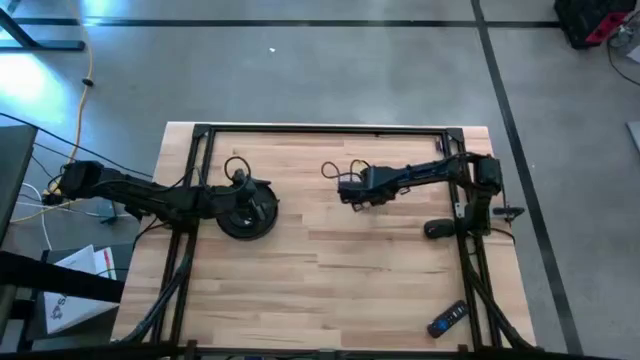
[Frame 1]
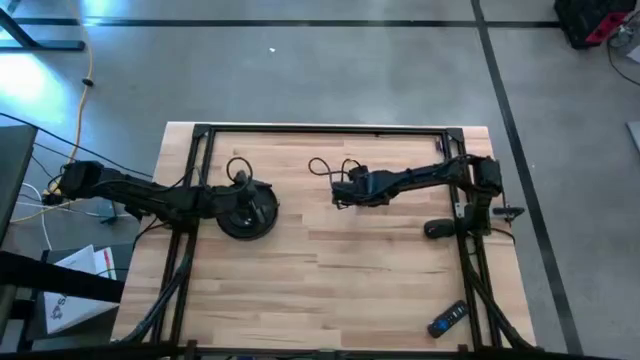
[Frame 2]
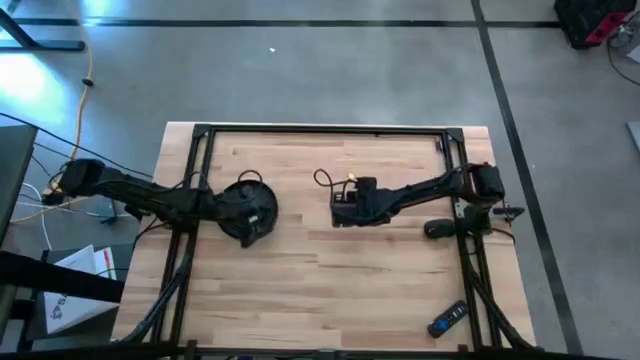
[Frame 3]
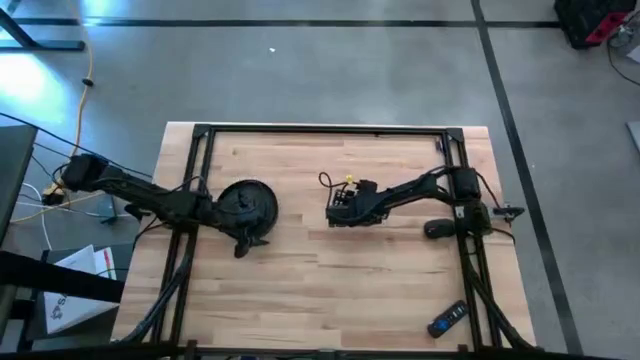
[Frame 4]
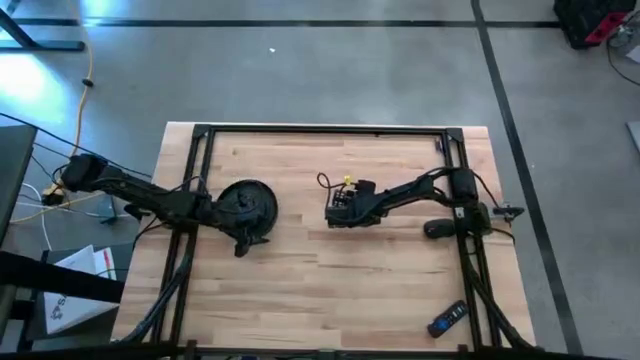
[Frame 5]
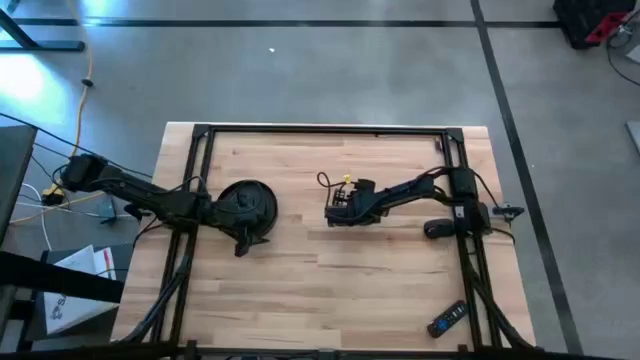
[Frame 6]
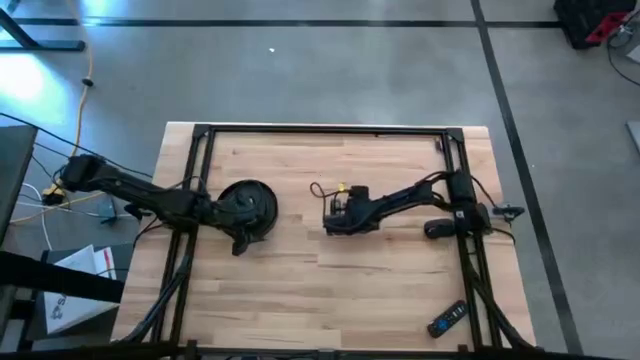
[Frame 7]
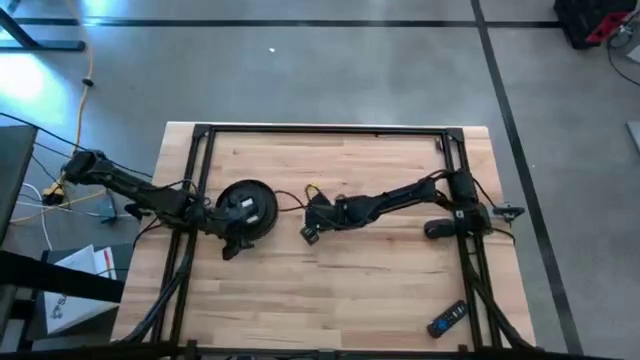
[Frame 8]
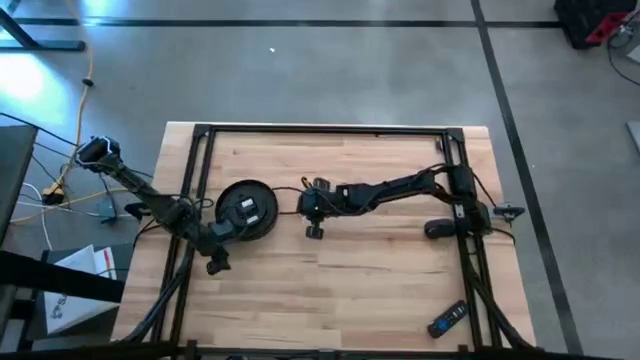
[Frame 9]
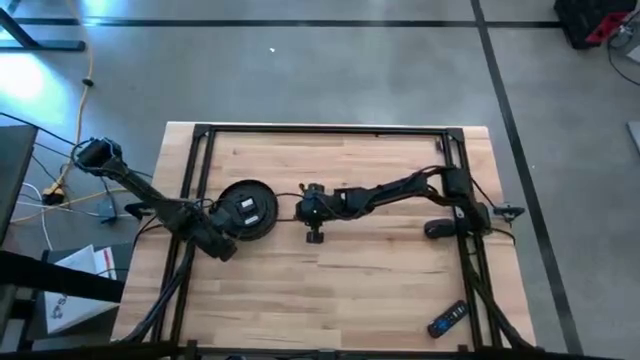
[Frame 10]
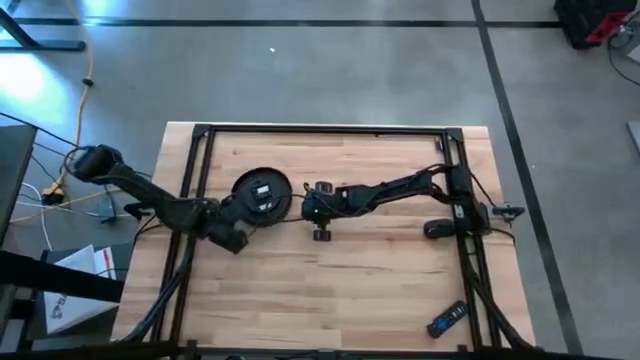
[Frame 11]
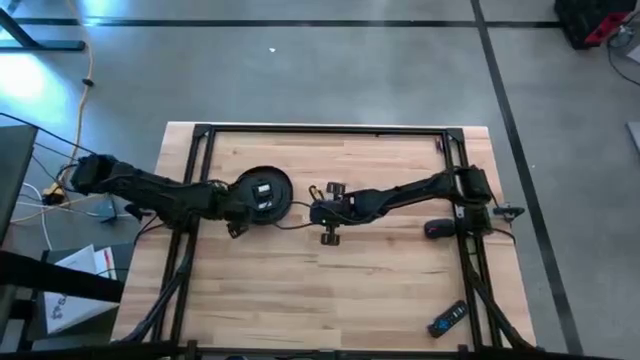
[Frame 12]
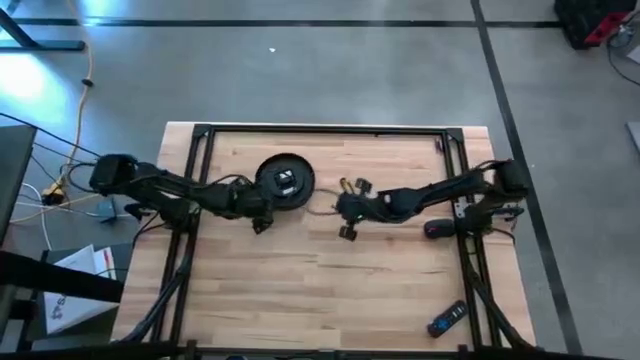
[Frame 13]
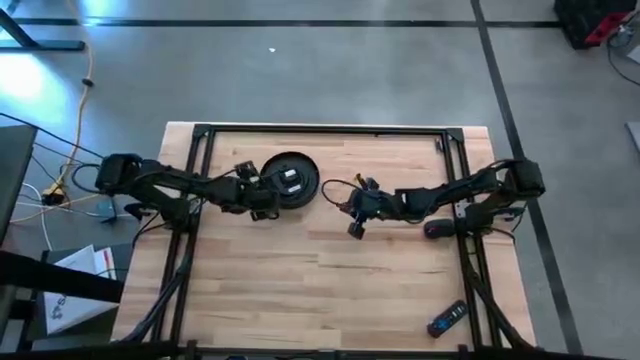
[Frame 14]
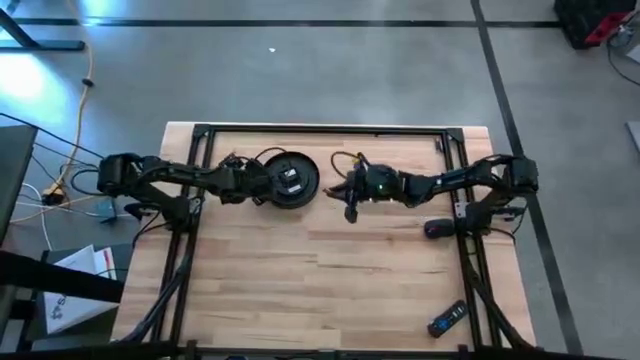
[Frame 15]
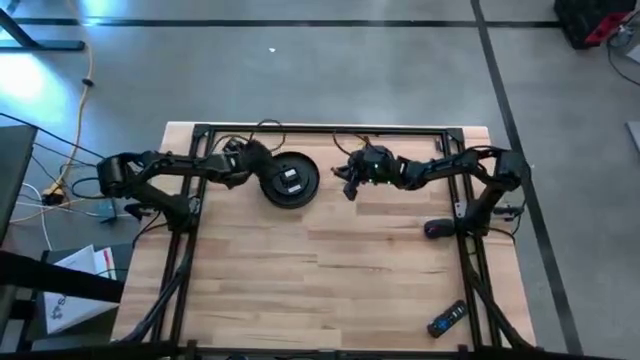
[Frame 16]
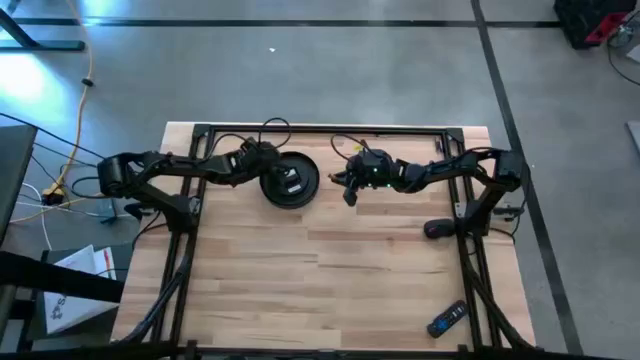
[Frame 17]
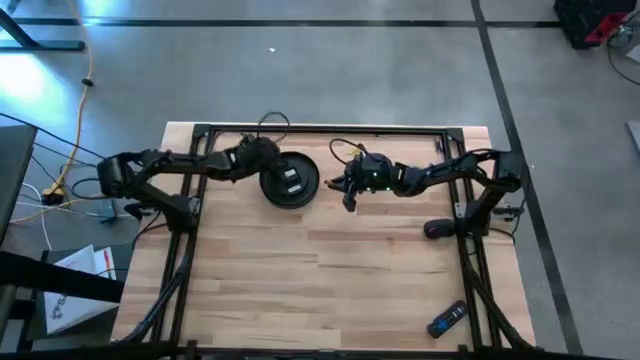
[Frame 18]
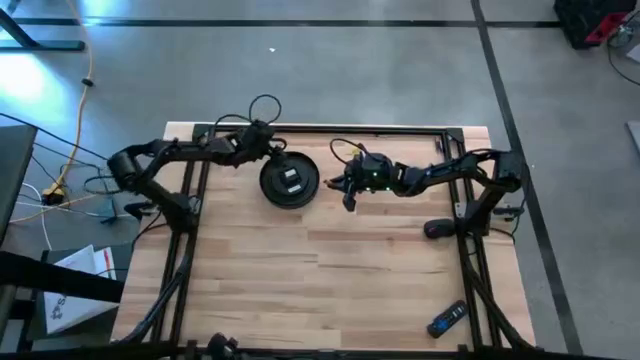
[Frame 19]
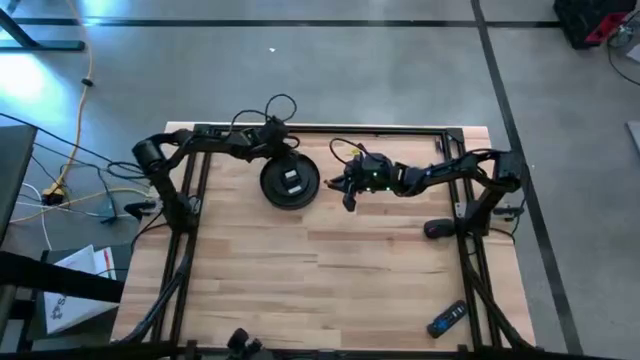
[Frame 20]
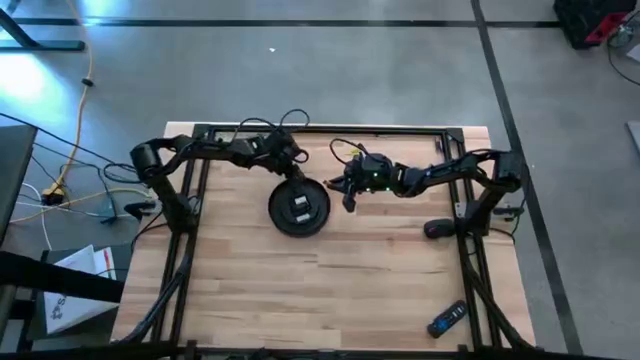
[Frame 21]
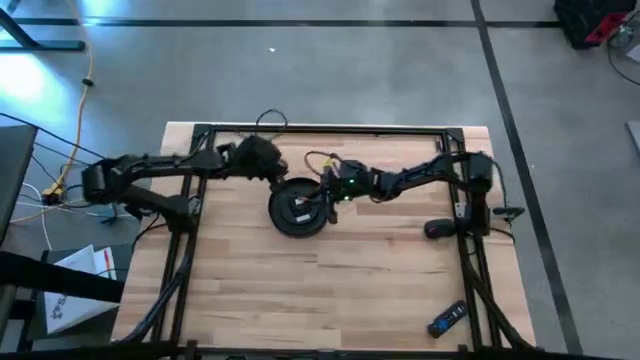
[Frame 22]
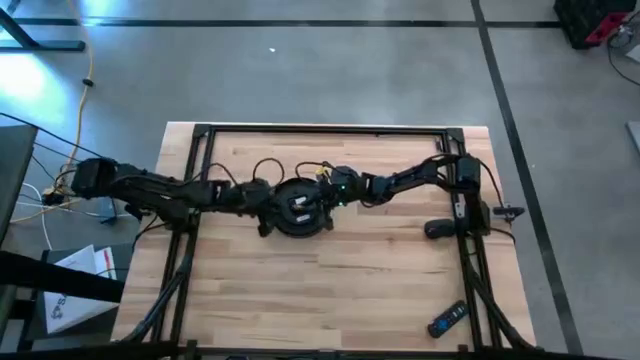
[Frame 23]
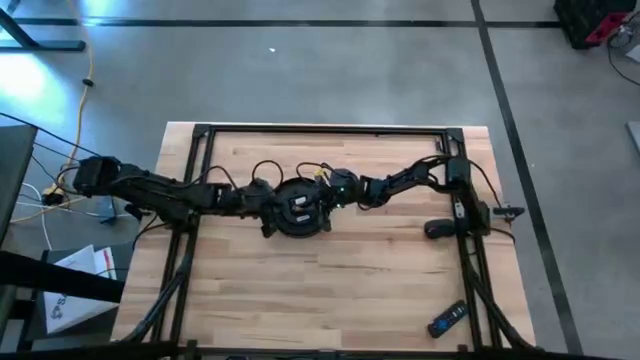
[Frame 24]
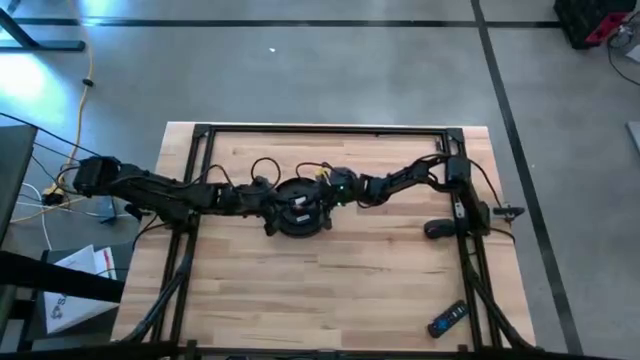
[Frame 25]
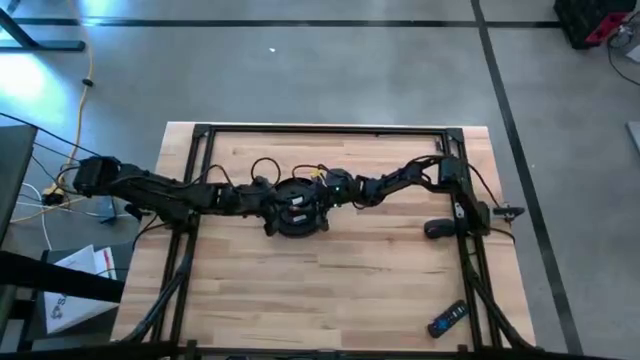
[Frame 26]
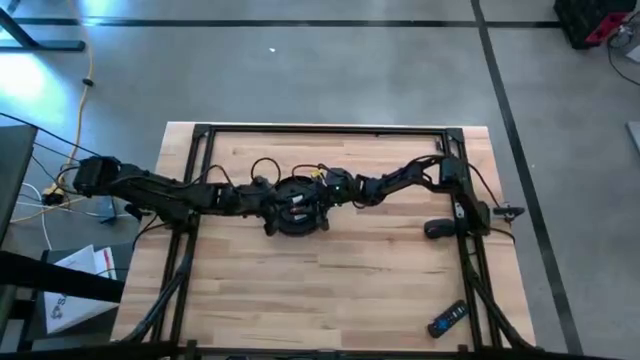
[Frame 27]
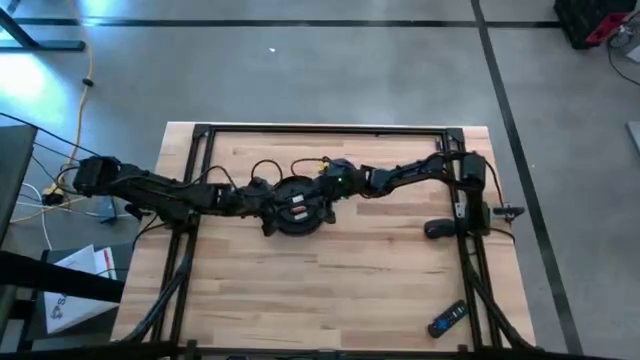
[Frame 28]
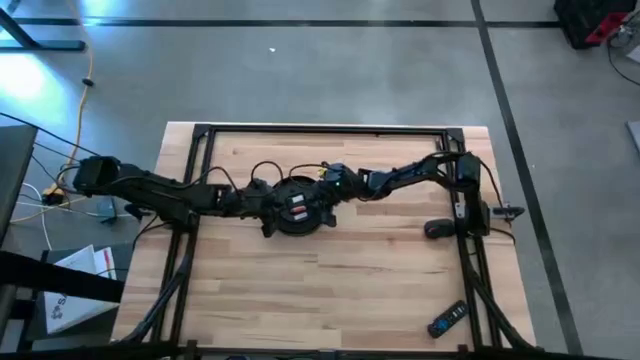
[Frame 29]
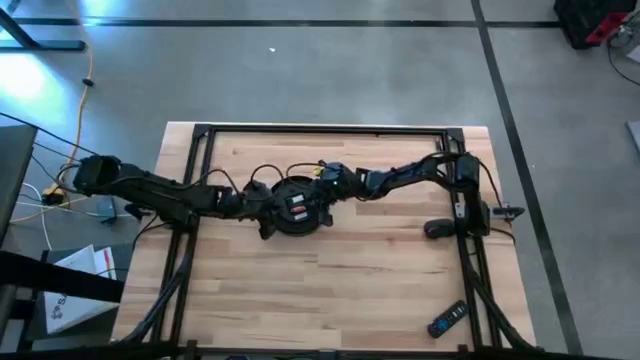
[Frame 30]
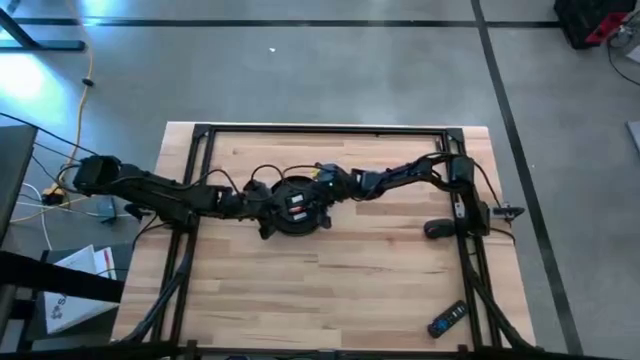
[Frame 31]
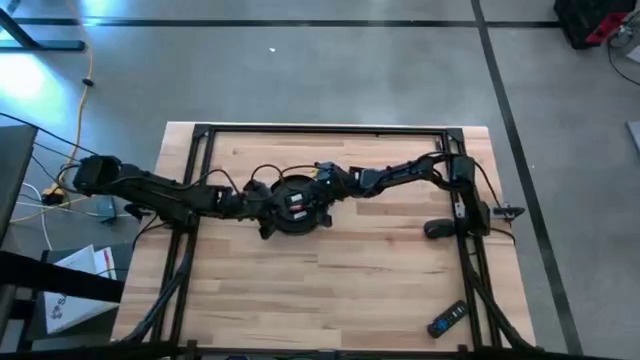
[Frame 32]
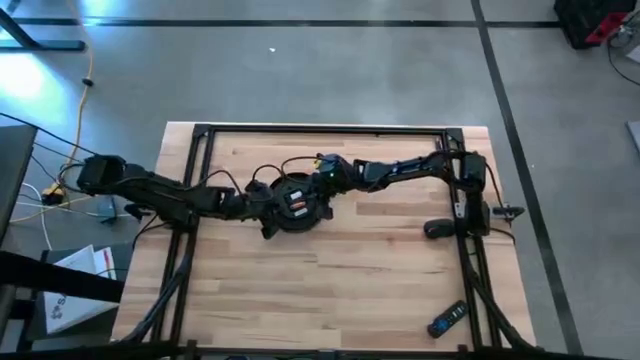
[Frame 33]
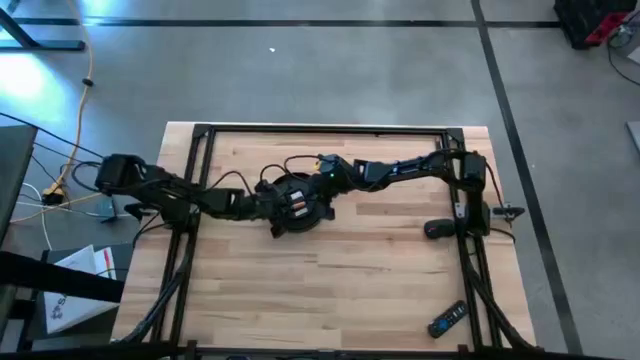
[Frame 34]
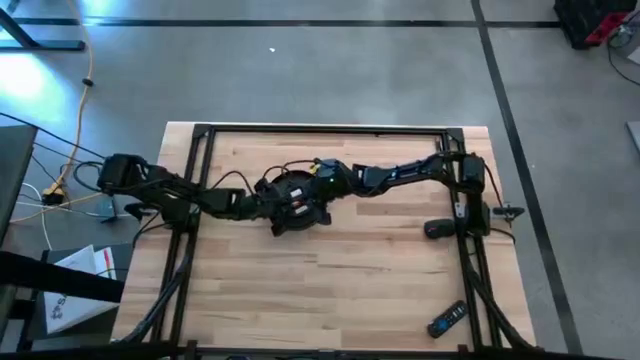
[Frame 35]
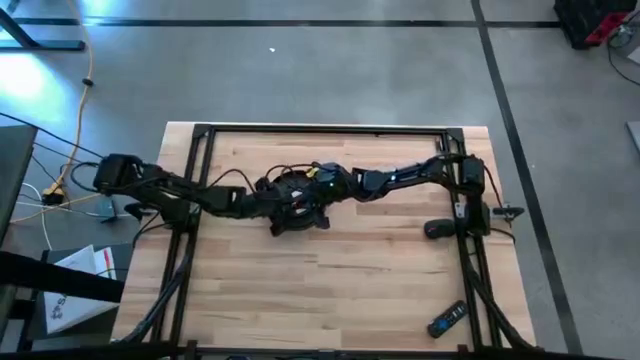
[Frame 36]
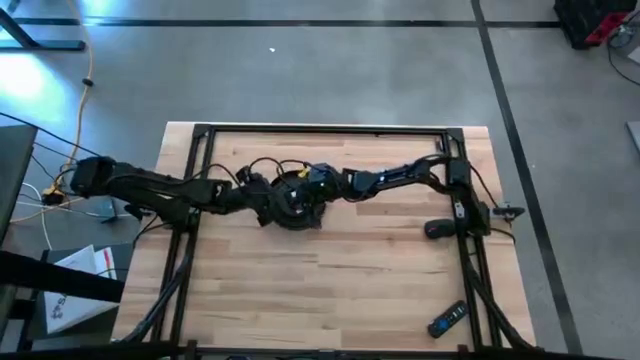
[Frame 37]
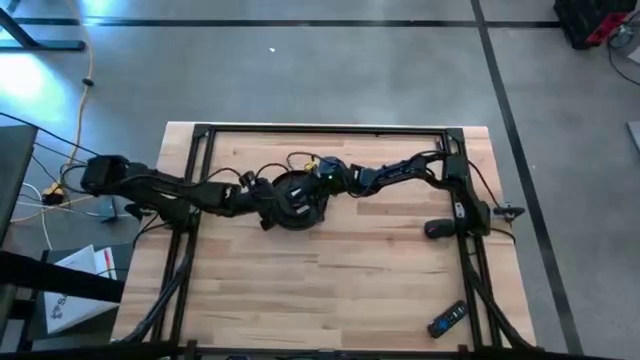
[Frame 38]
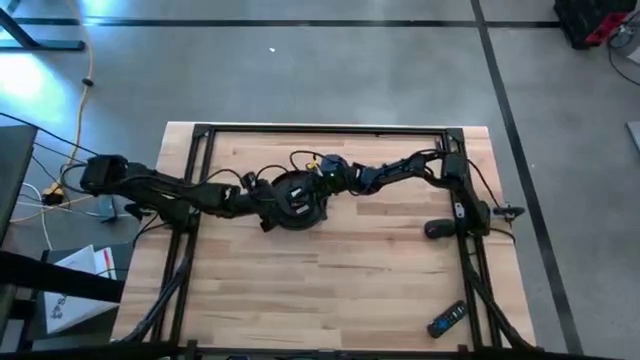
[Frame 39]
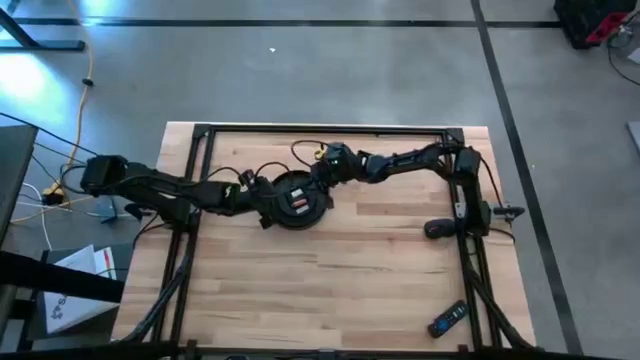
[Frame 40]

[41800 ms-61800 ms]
Task: Insert battery
Insert the yellow battery into the white-black wall clock

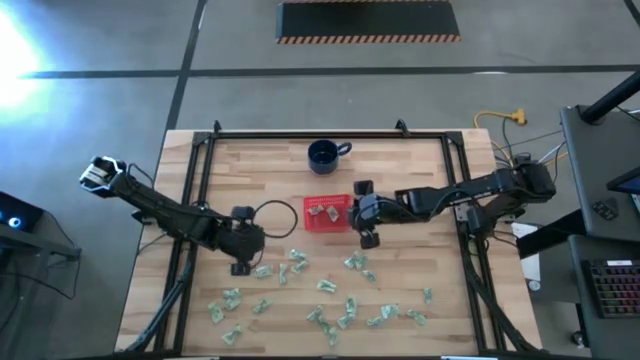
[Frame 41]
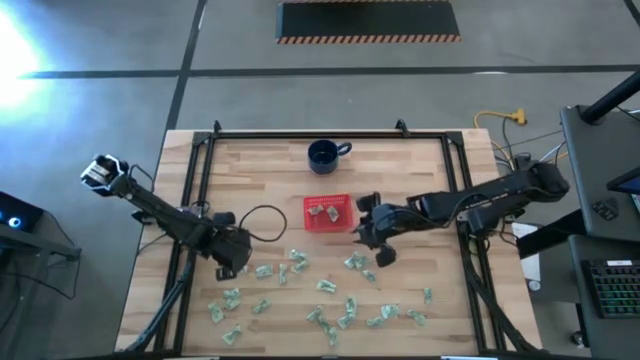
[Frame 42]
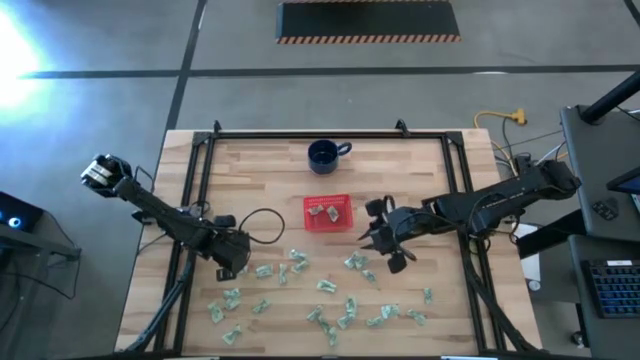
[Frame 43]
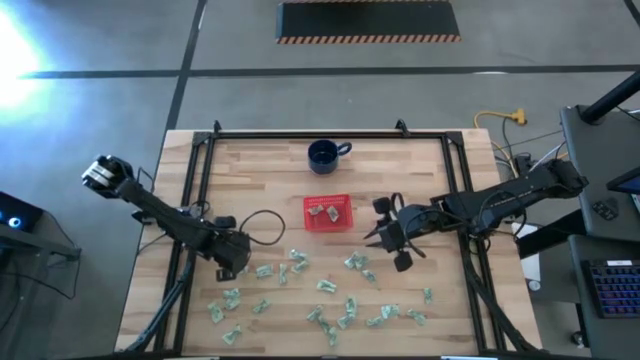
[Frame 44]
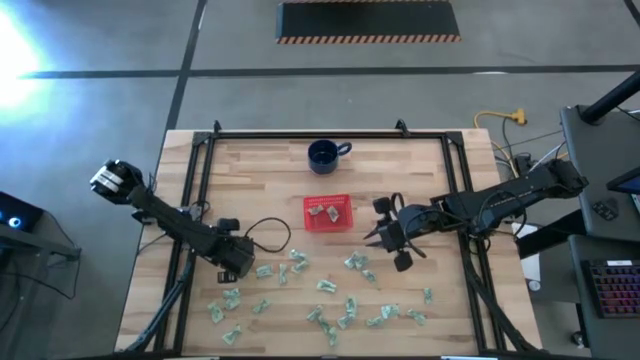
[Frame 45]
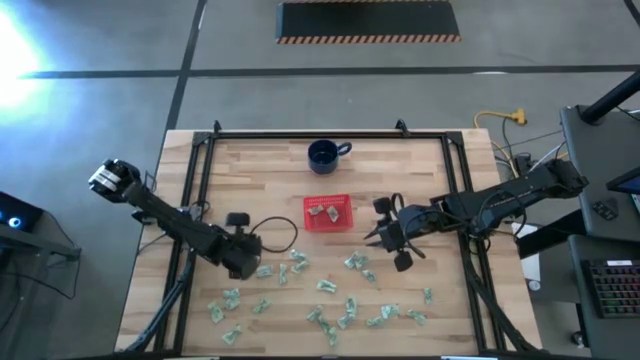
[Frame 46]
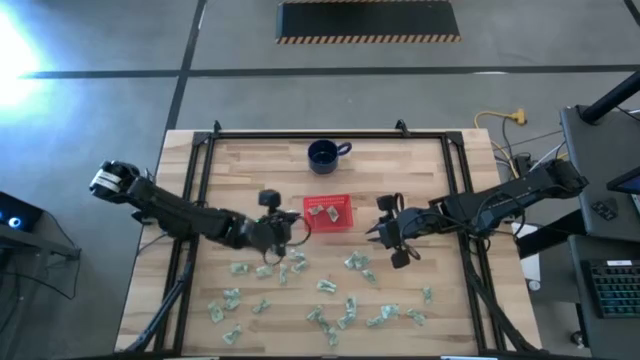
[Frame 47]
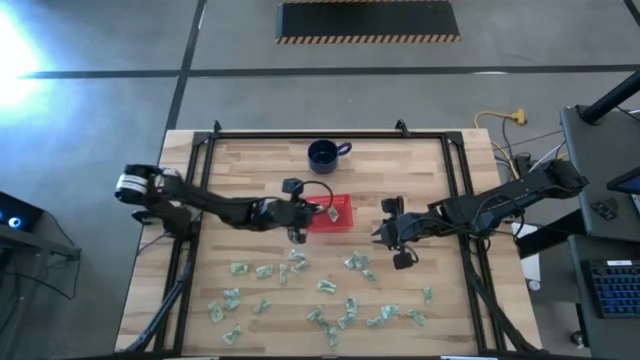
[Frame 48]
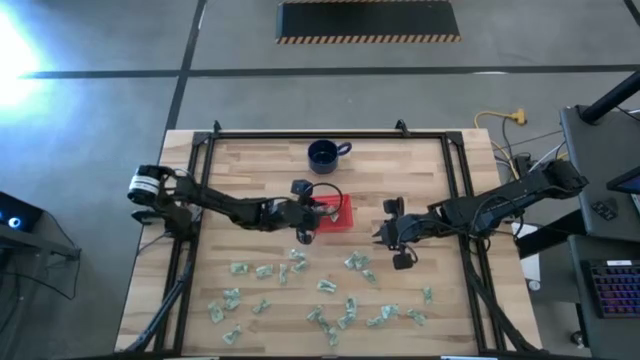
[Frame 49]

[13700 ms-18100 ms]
Task: Pick and place items into bin
Put the stevia packet into the red bin
